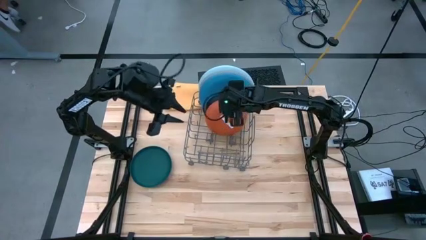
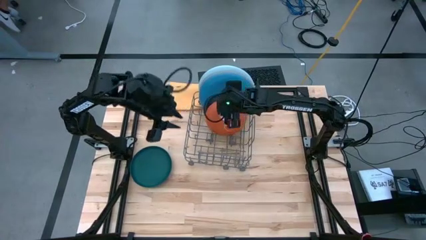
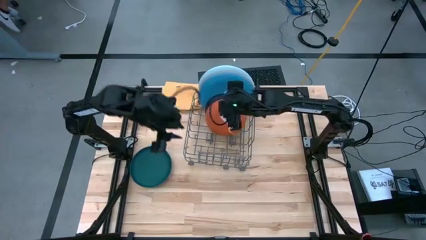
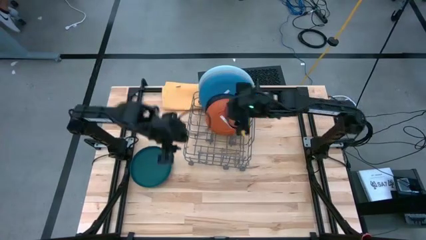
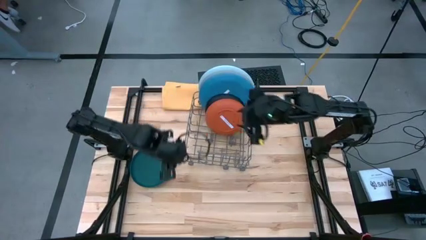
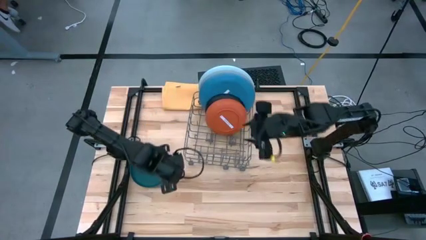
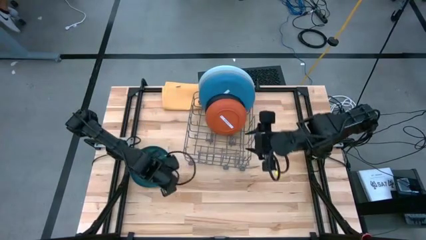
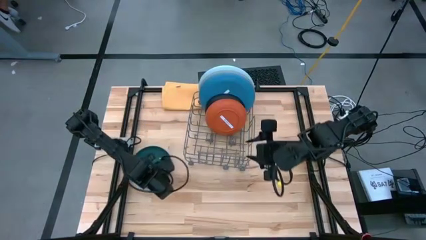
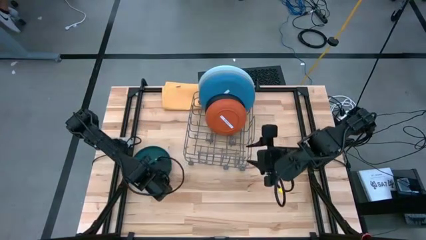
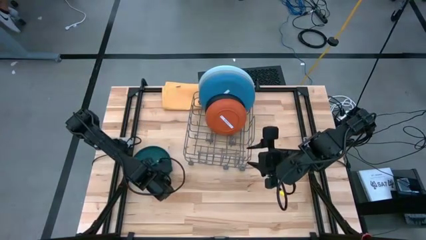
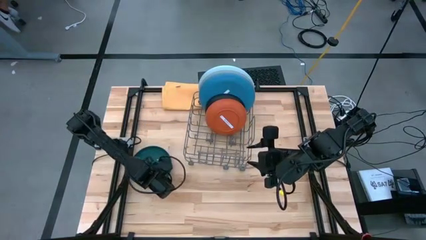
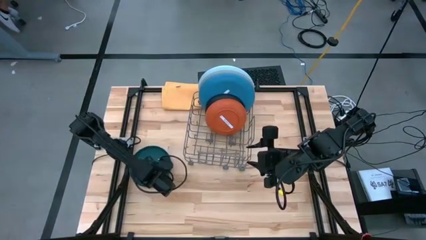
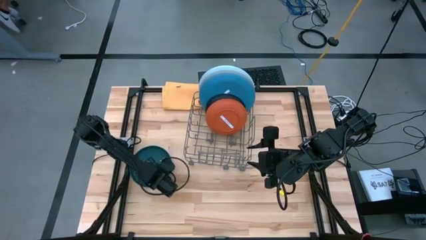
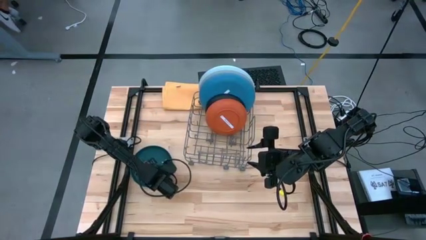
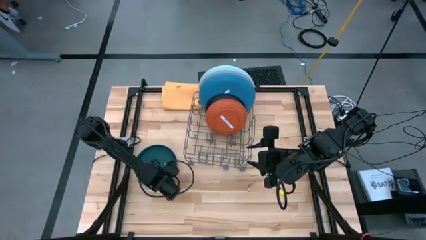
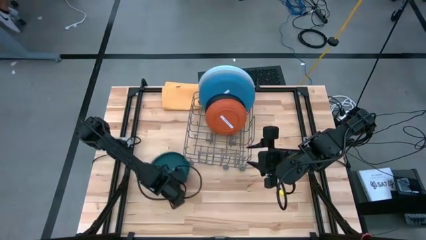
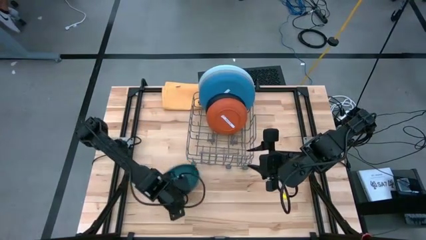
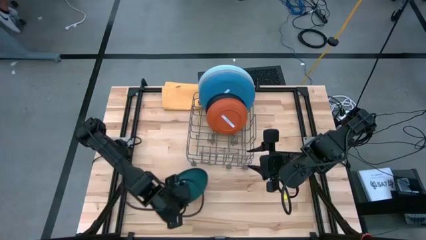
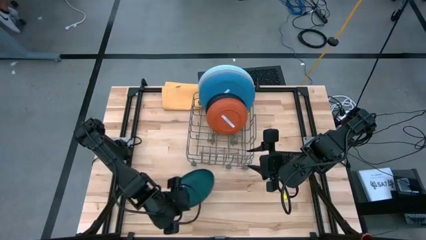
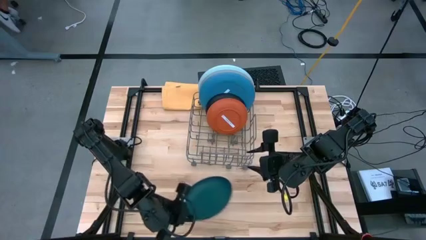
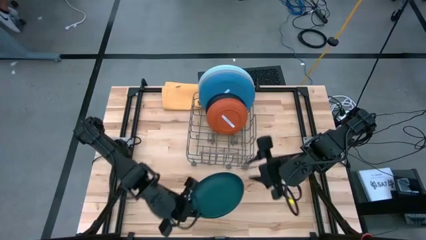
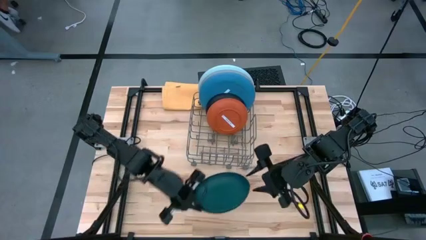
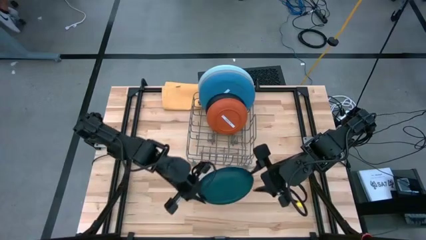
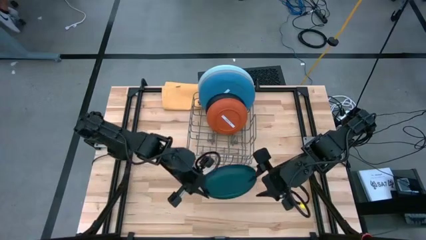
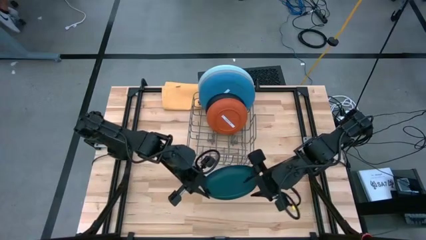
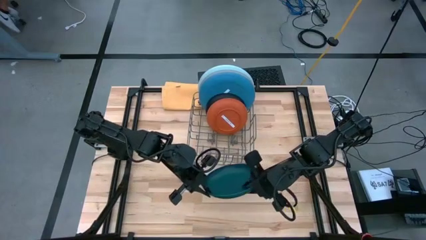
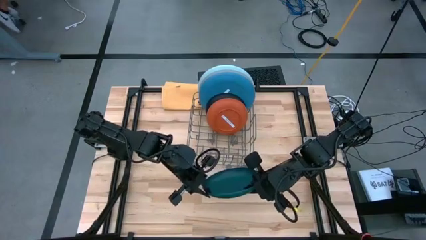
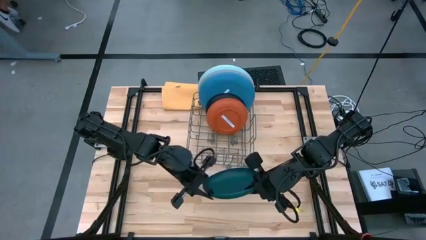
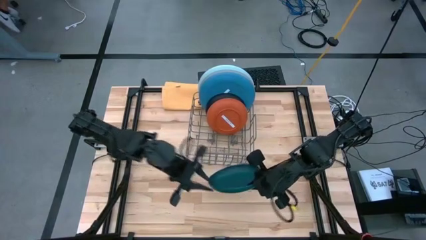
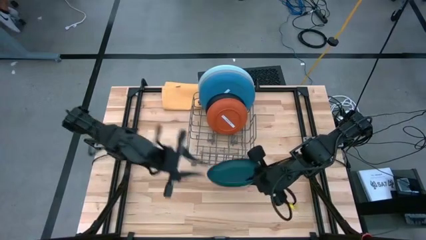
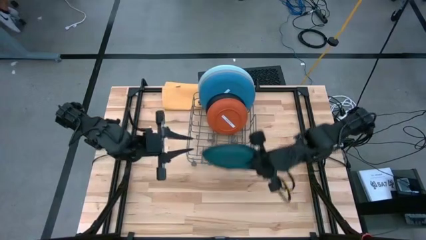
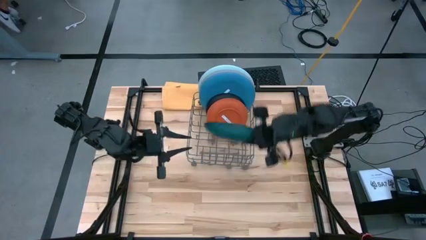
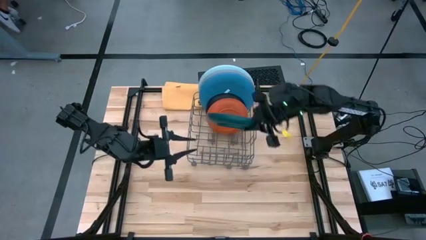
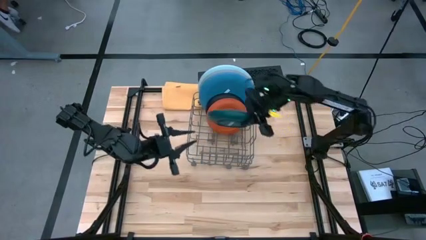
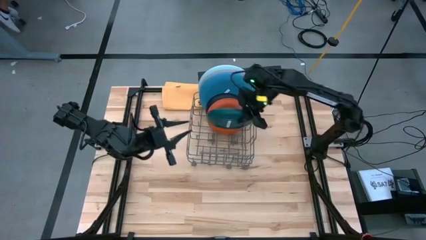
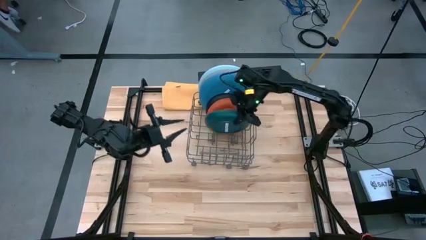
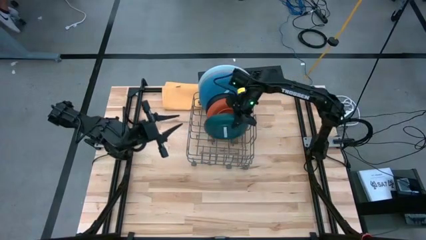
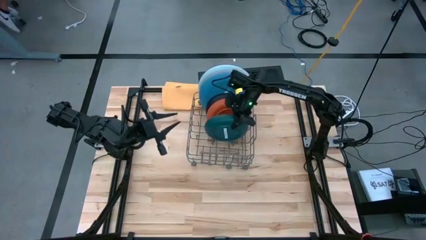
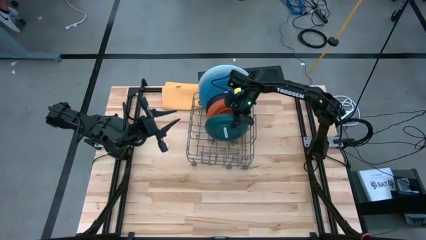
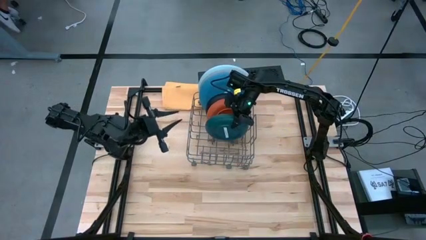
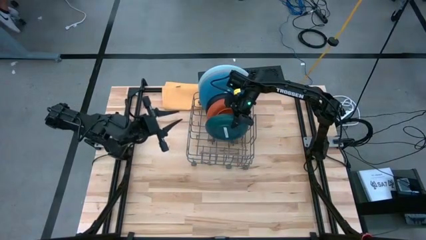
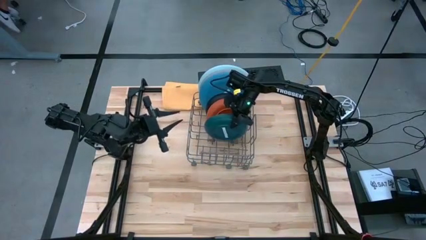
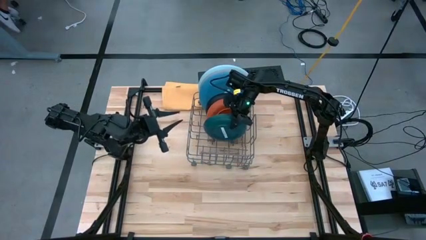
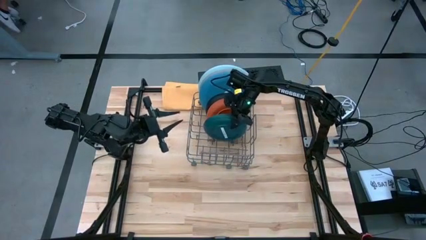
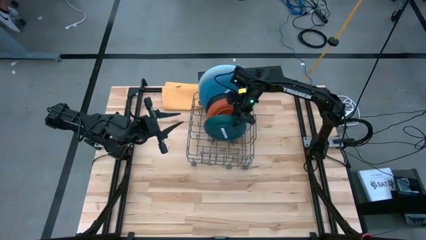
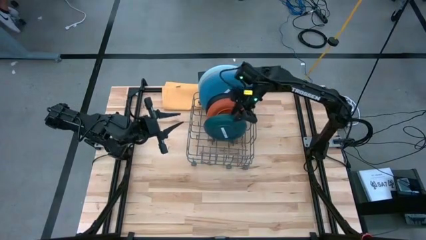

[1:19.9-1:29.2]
Task: Sort dishes
Put the green plate into the dish rack

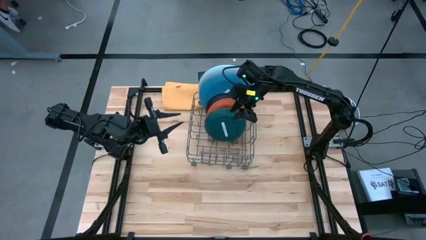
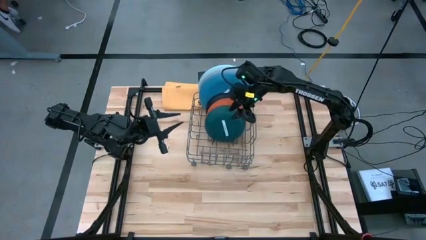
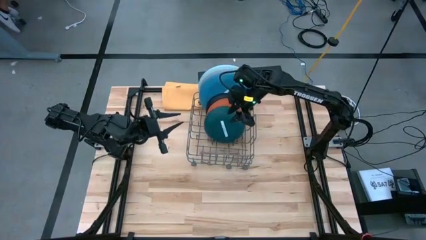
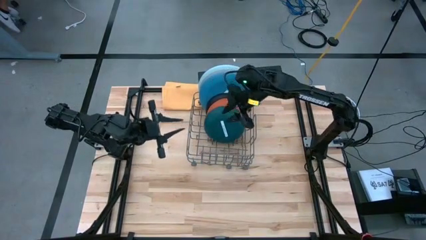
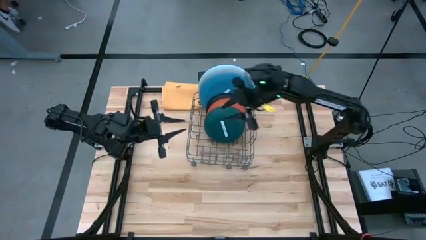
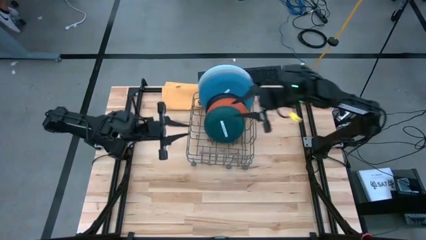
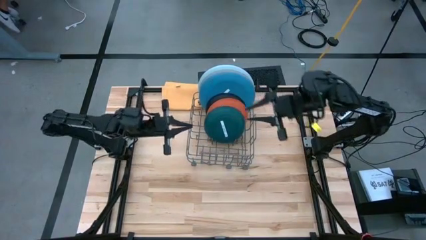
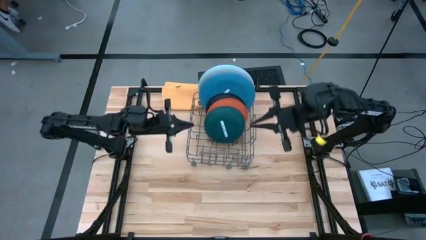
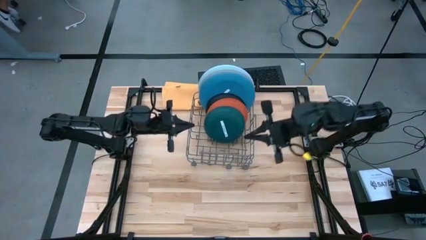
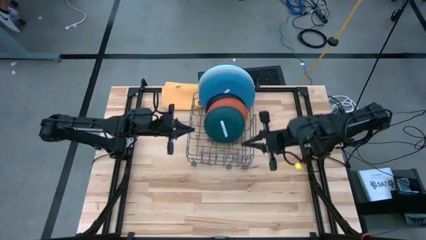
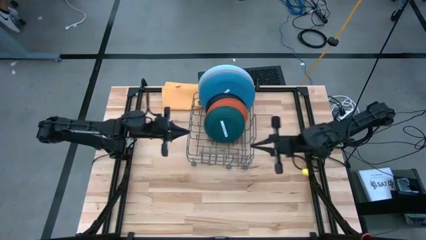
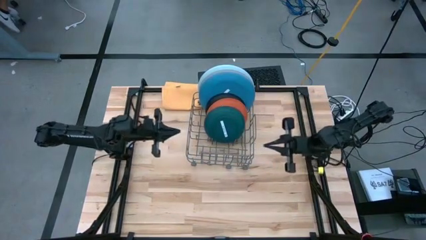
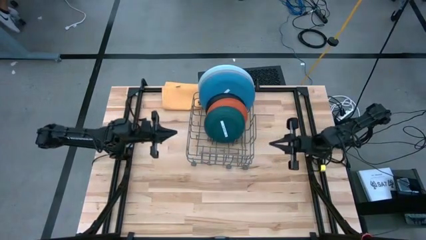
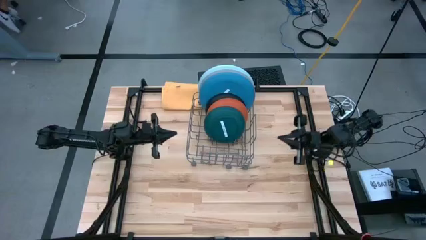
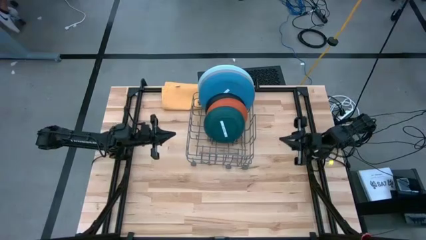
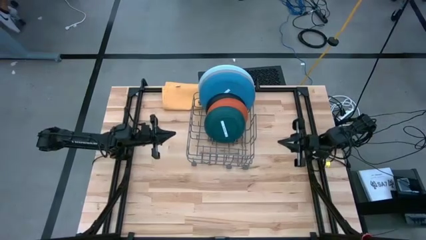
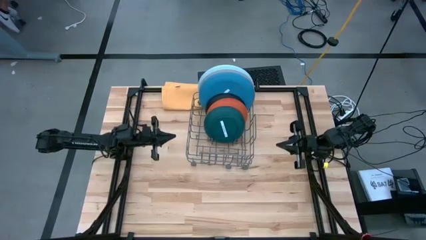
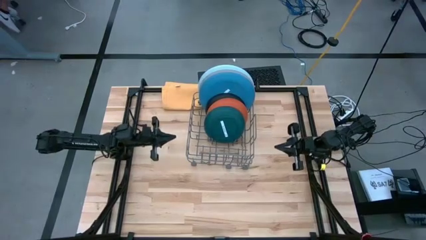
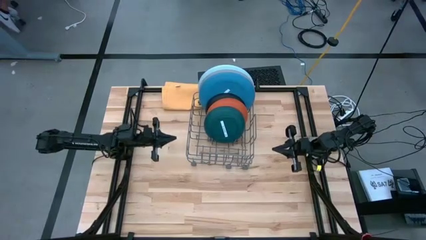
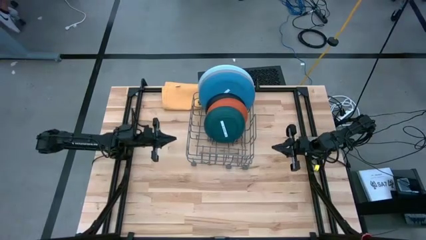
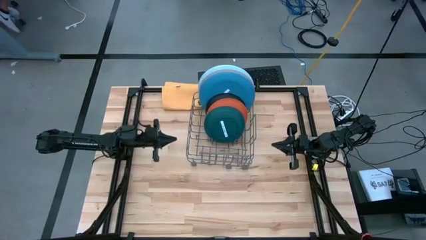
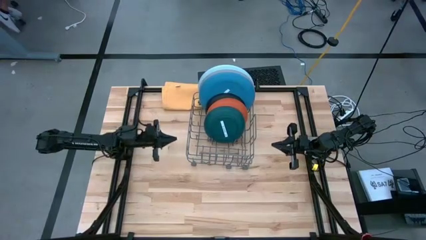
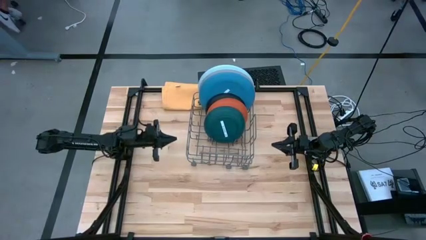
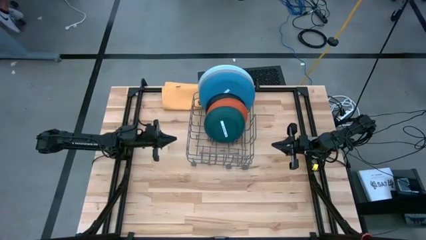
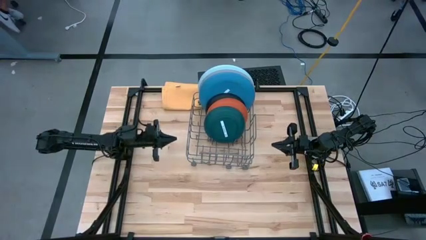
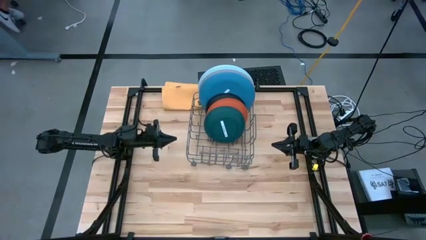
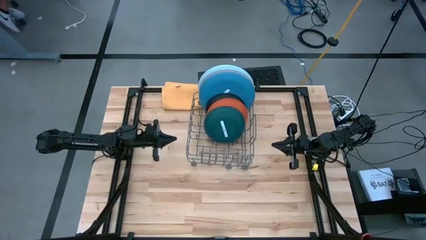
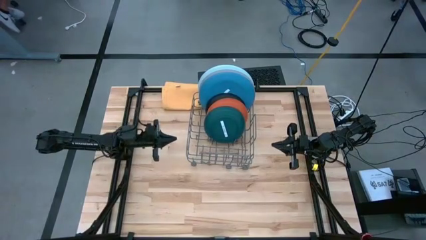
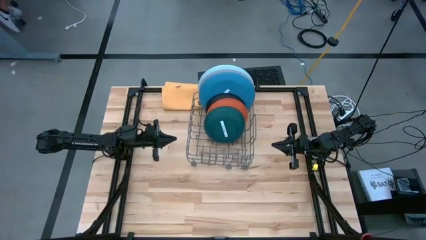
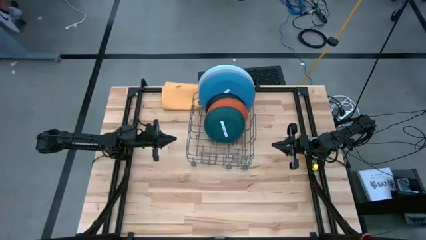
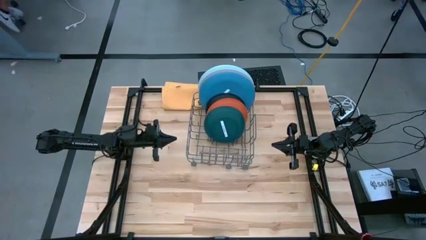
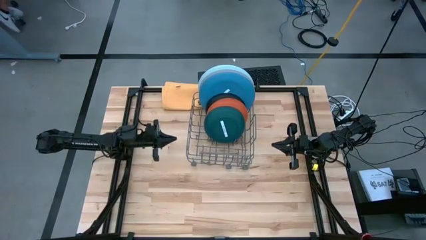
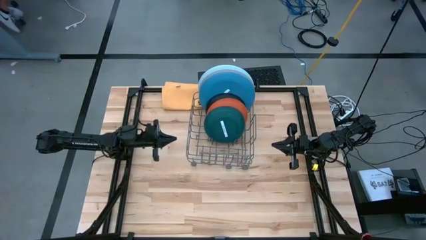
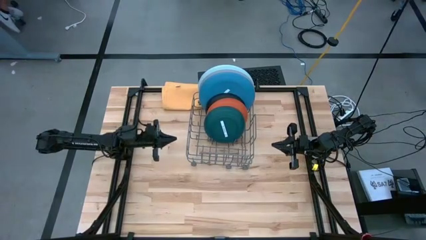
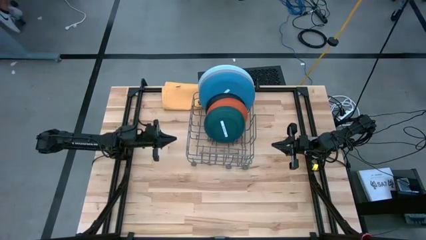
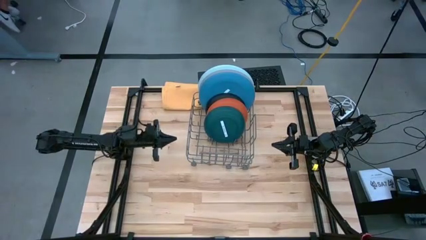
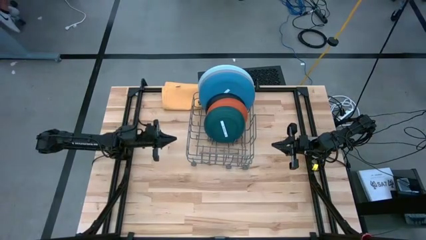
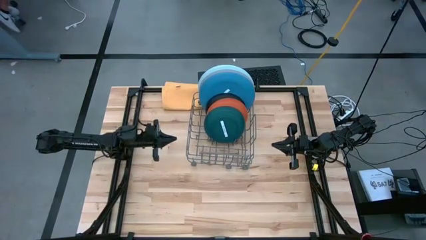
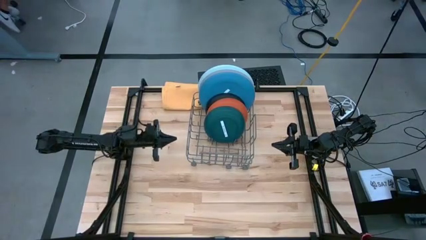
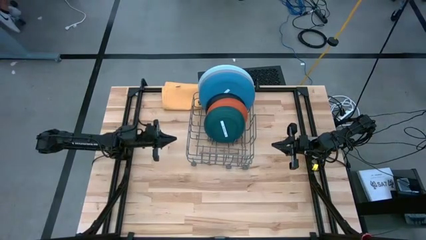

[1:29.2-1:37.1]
Return to Home Position

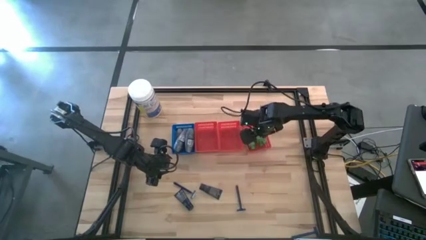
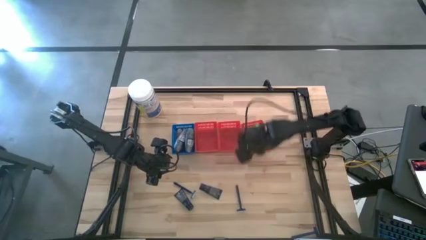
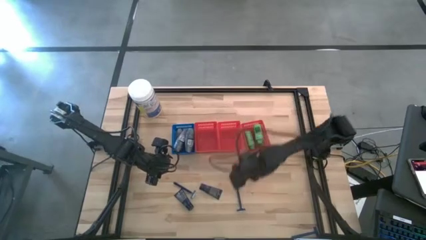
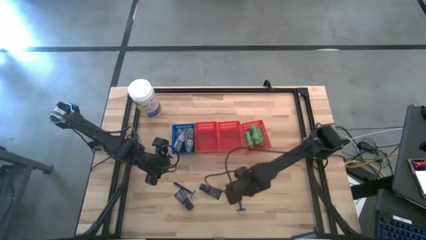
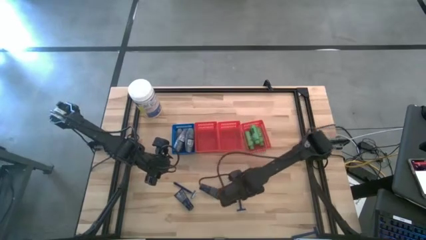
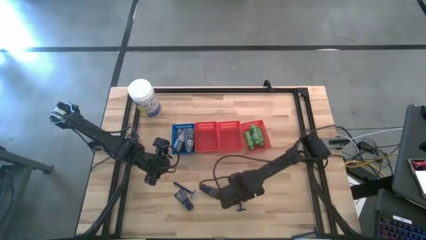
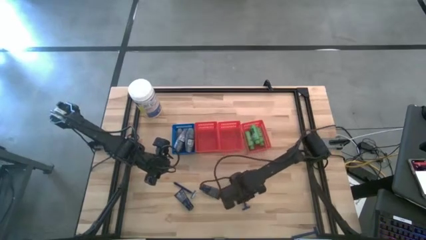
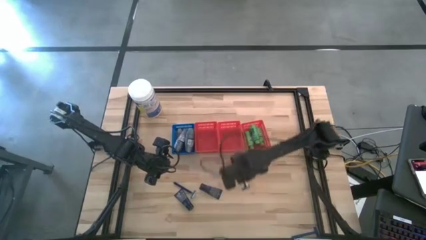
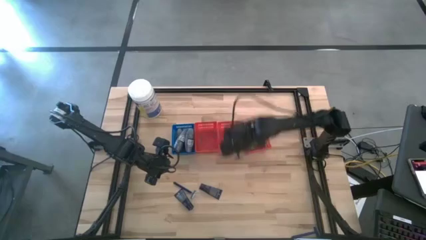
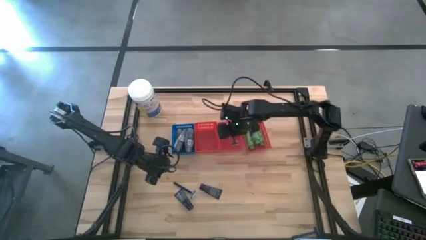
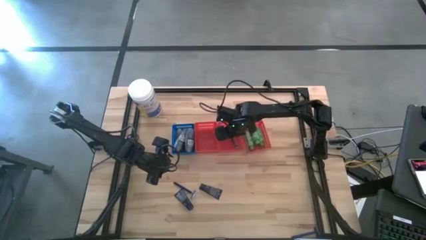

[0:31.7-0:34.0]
Task: Pick & Place Travel size toiletries
Put the razor into the middle red bin
